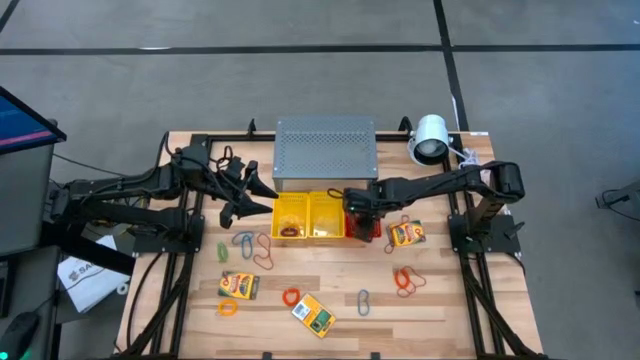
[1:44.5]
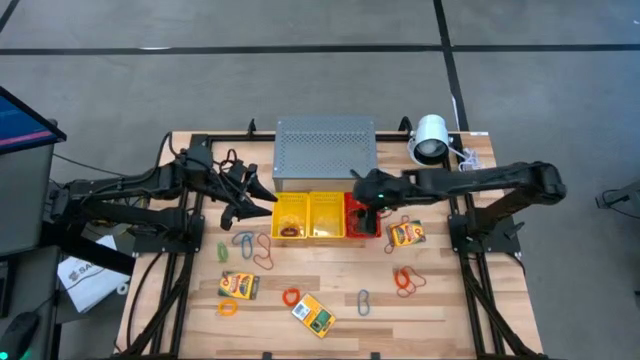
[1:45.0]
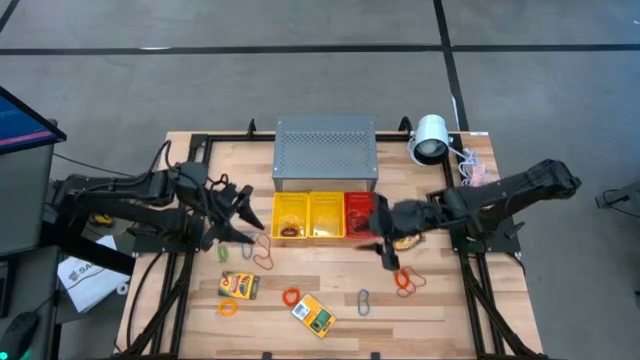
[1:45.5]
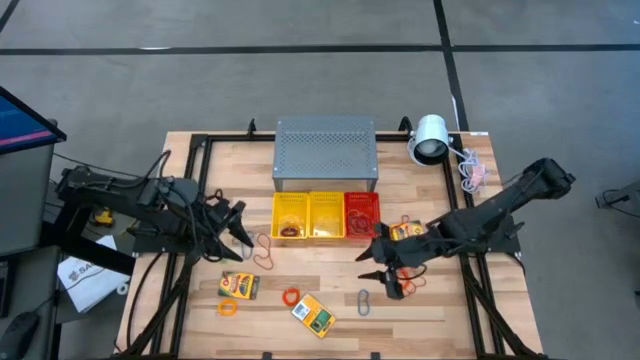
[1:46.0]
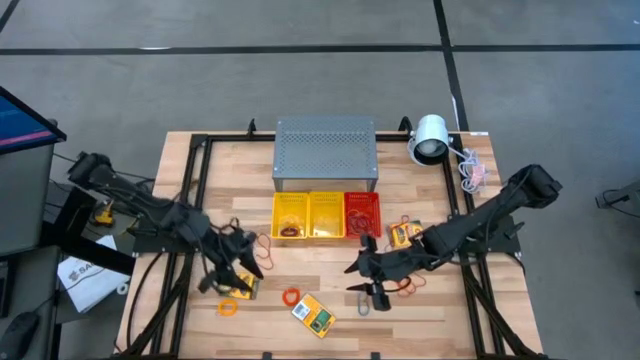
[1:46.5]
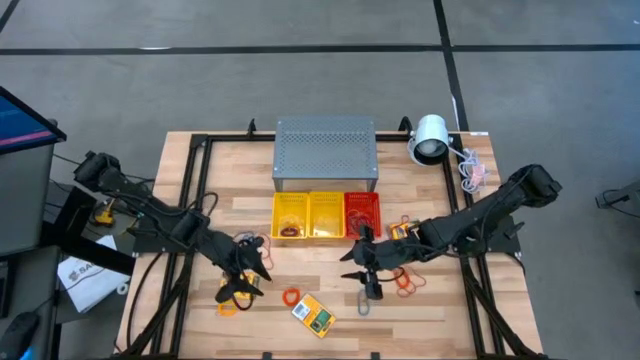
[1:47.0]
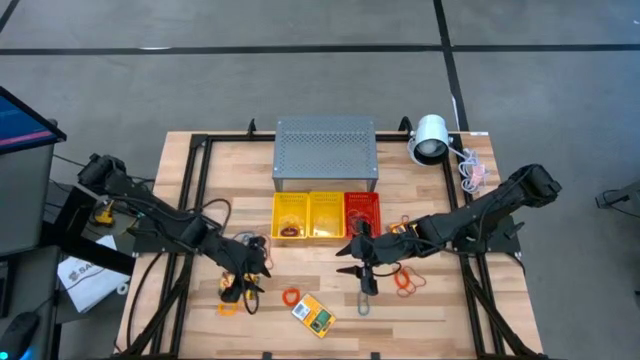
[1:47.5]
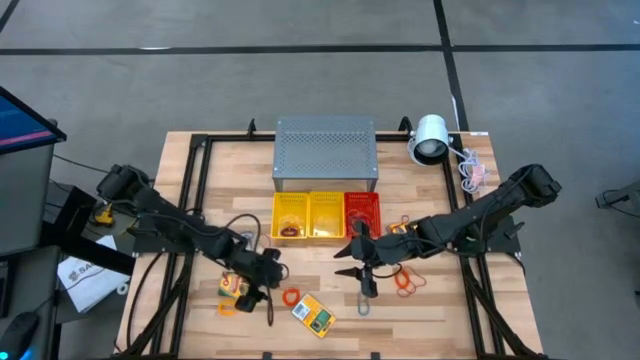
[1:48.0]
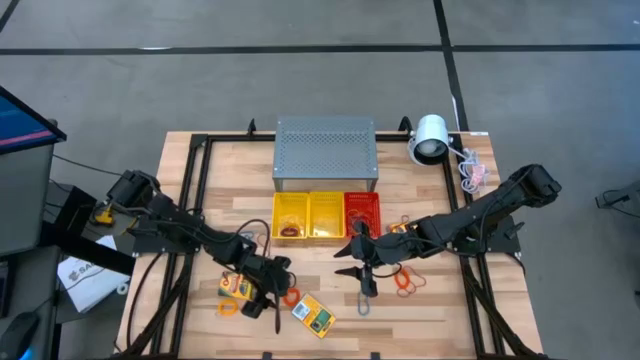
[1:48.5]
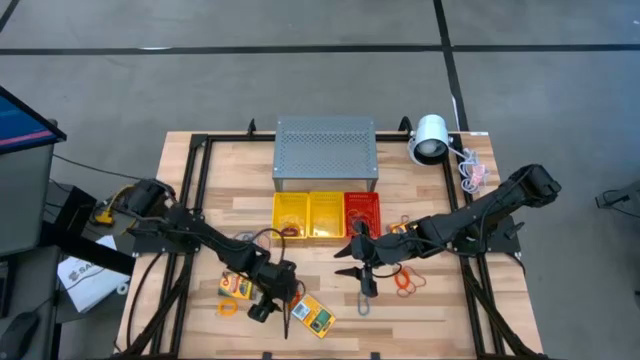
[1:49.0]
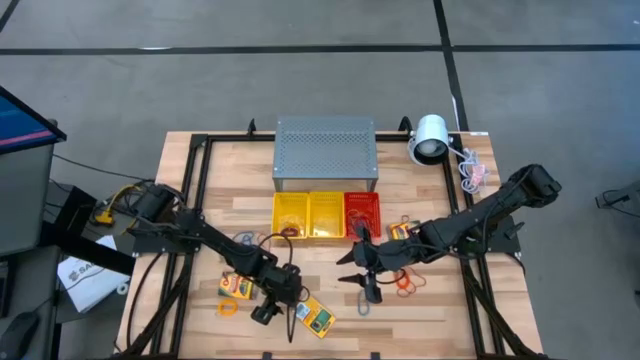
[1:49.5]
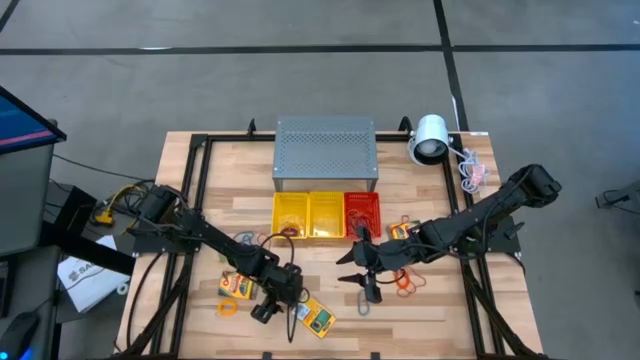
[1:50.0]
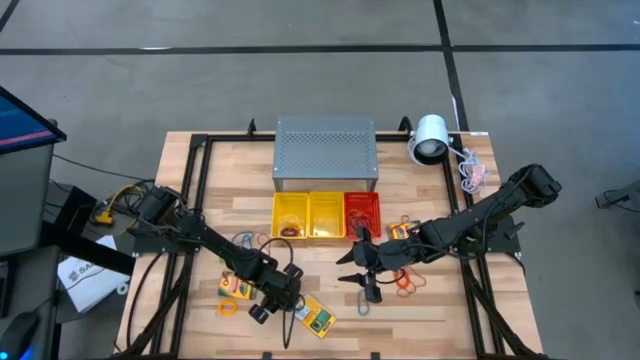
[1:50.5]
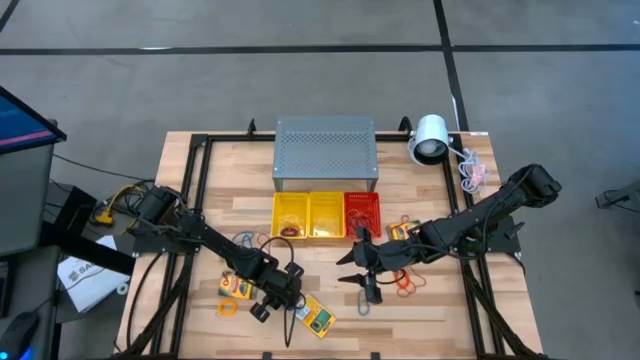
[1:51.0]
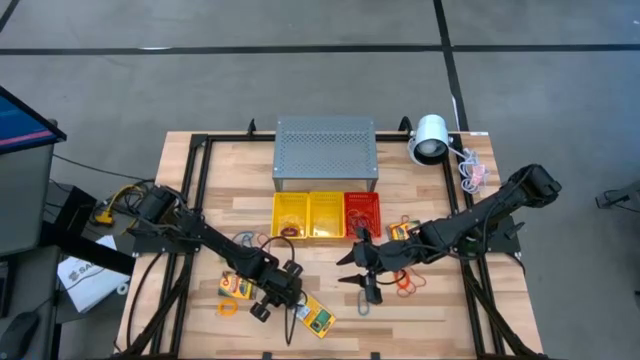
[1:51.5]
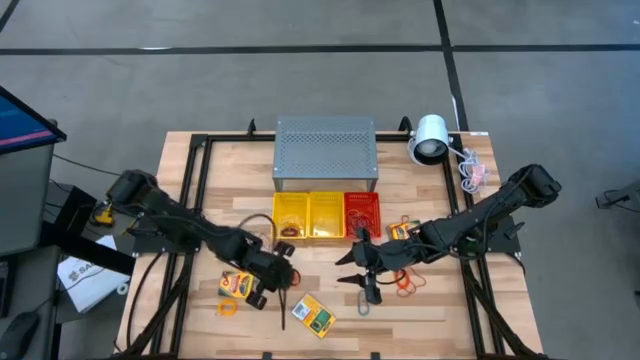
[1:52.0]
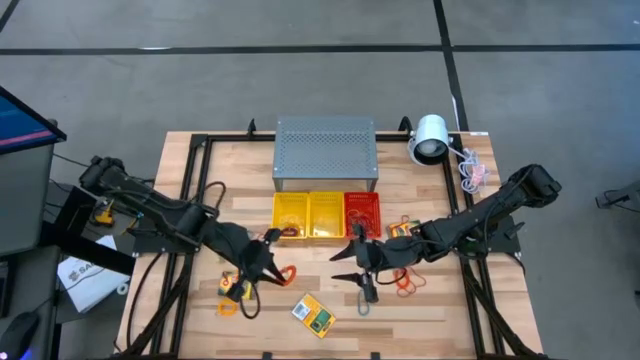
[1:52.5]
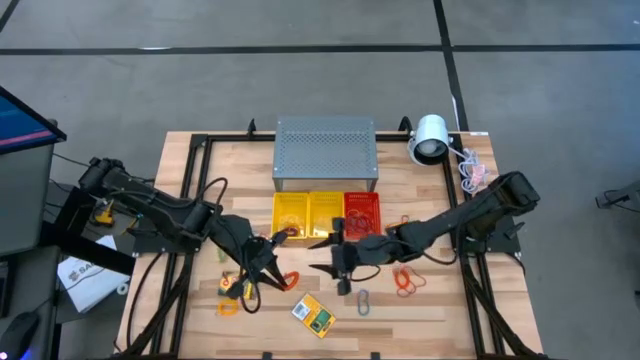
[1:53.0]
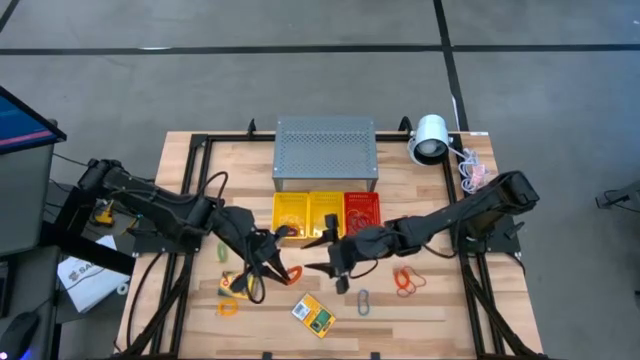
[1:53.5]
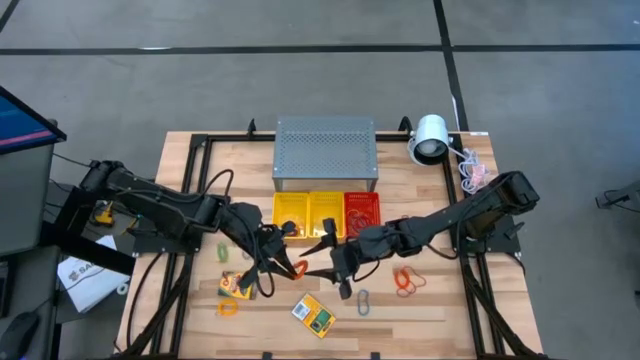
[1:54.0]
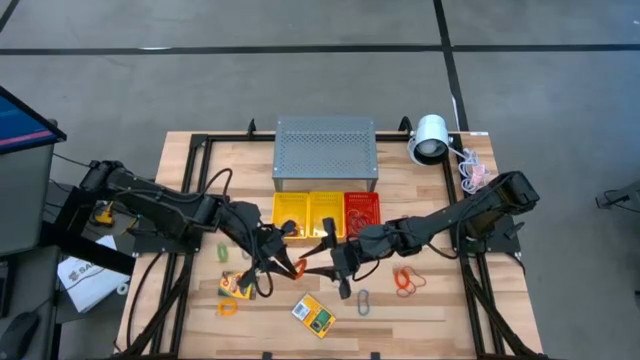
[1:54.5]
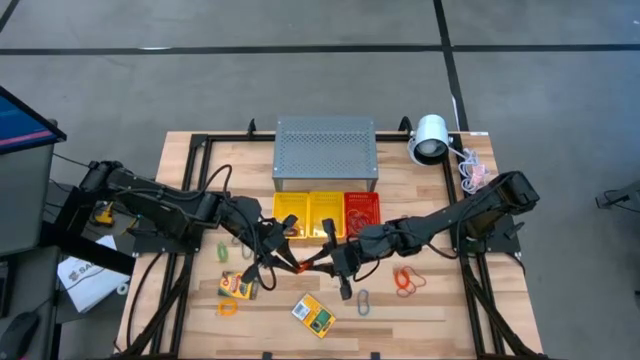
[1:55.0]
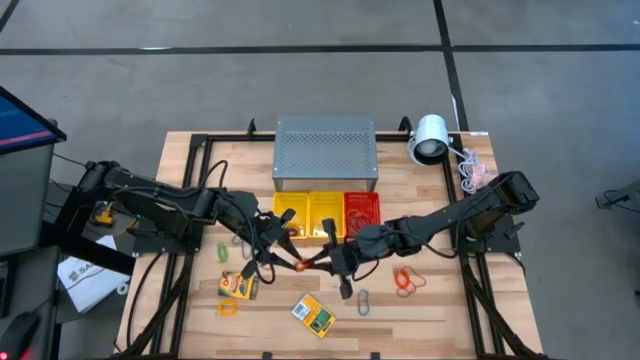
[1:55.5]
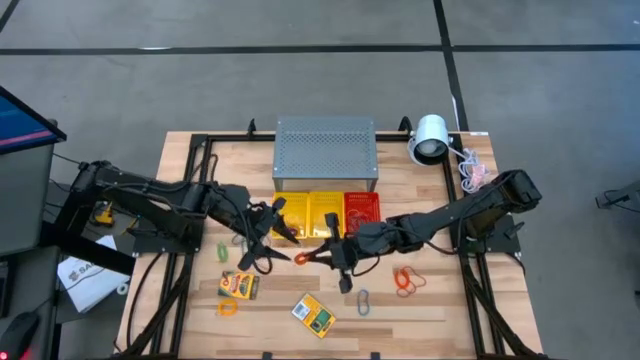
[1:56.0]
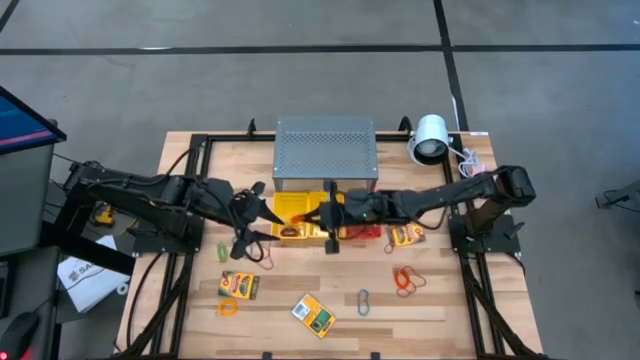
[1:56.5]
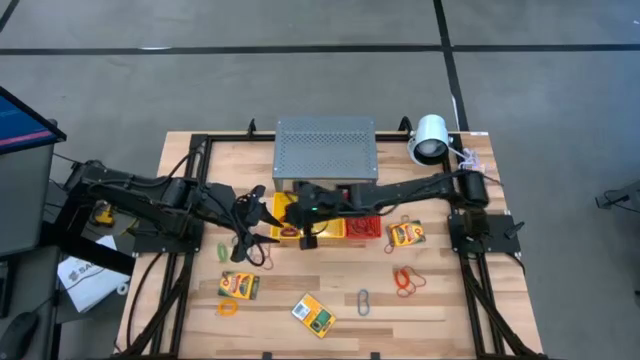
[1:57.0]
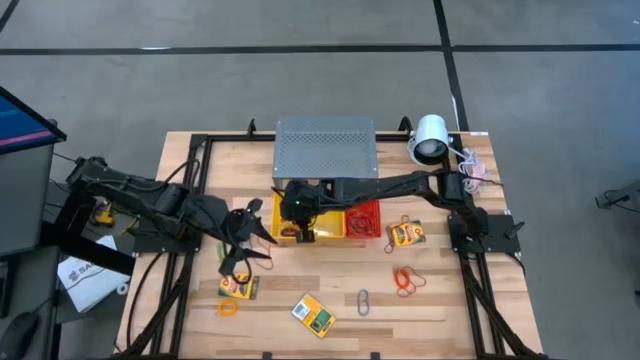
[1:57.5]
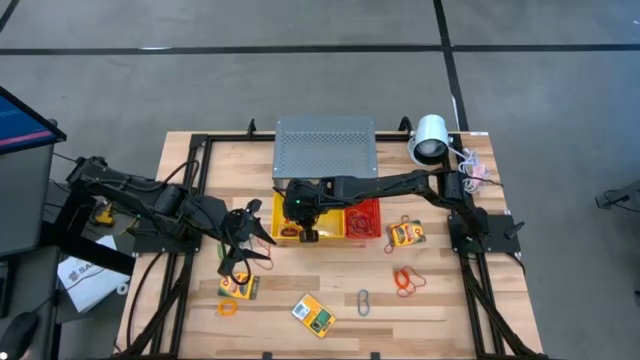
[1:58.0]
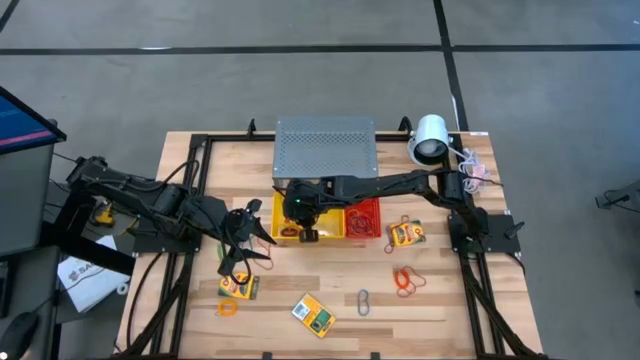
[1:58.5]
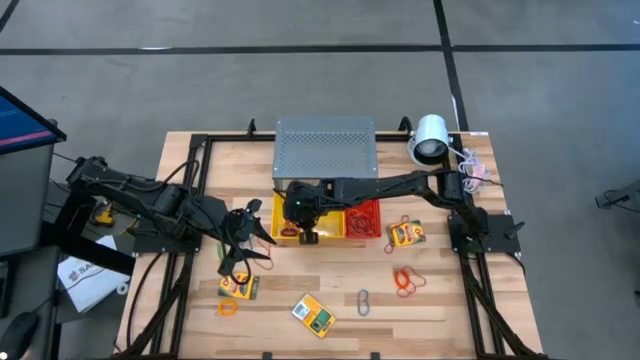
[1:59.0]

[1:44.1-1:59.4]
Task: Pick & Place Office Desk Supplies
Put the orange spring keychain into the left yellow bin

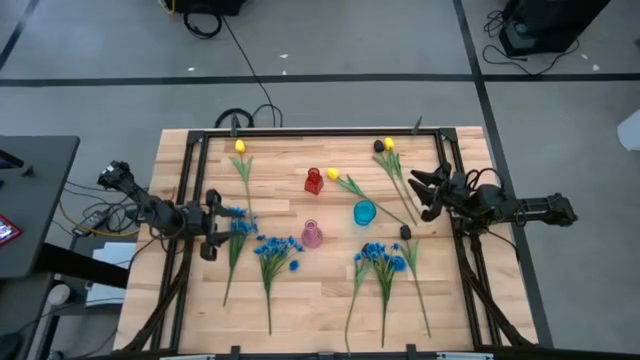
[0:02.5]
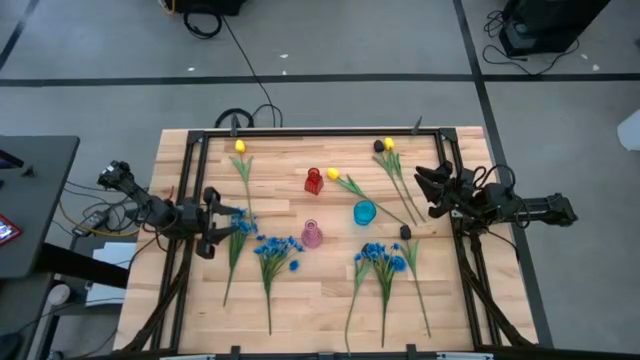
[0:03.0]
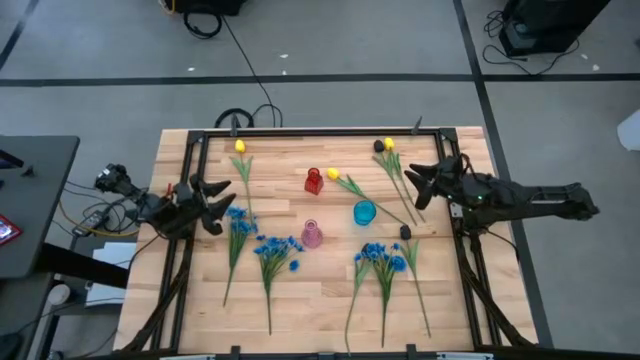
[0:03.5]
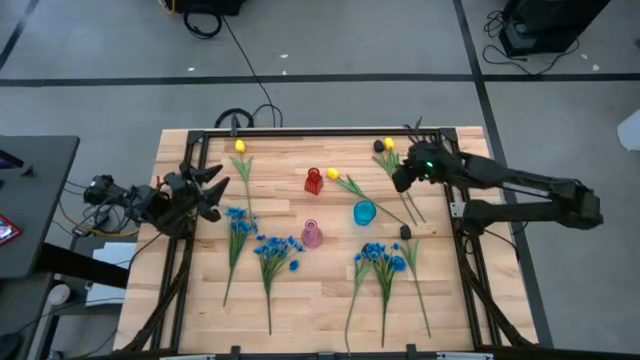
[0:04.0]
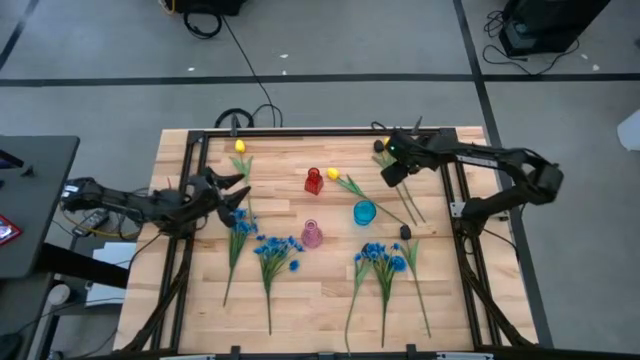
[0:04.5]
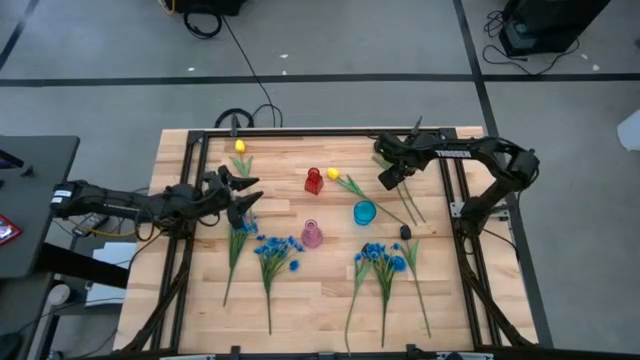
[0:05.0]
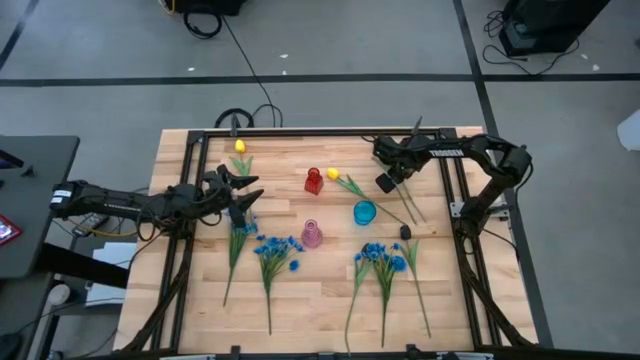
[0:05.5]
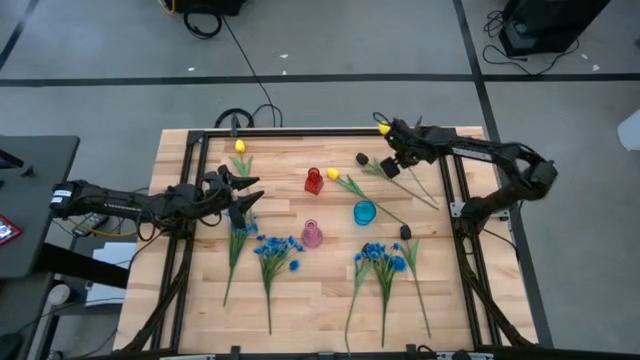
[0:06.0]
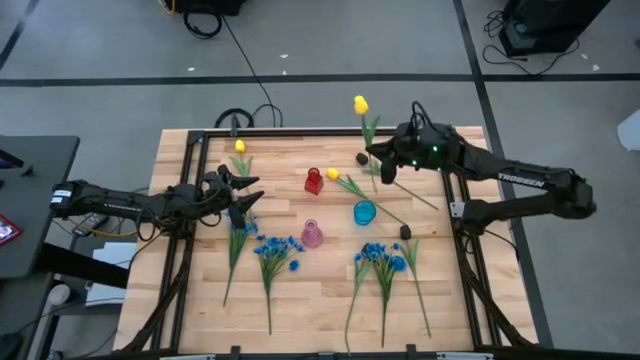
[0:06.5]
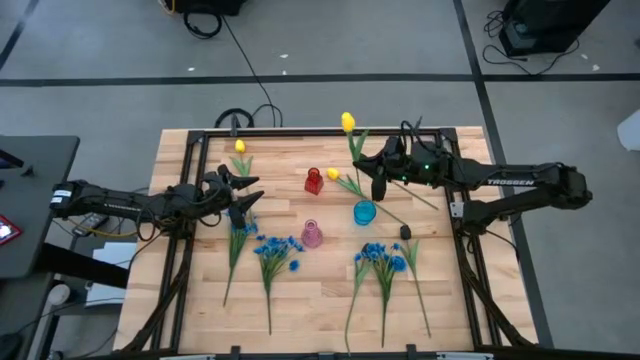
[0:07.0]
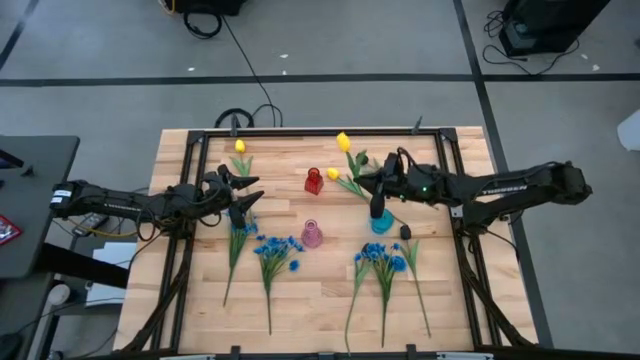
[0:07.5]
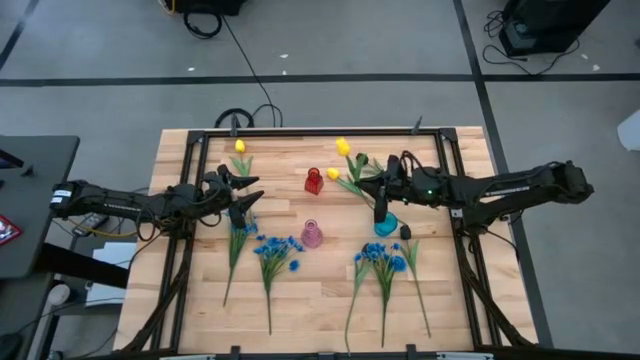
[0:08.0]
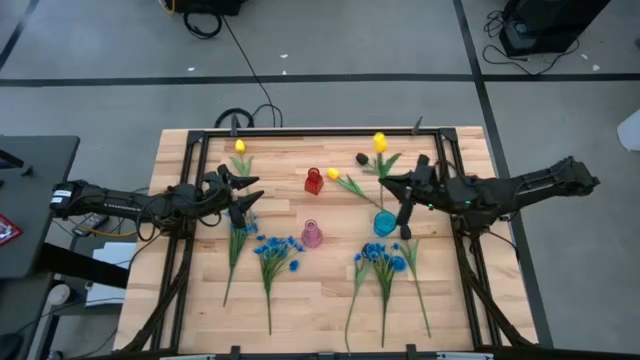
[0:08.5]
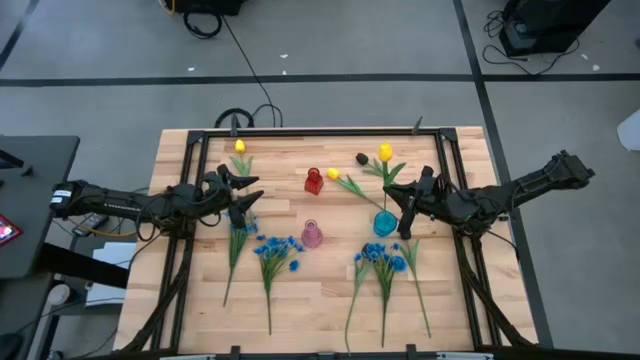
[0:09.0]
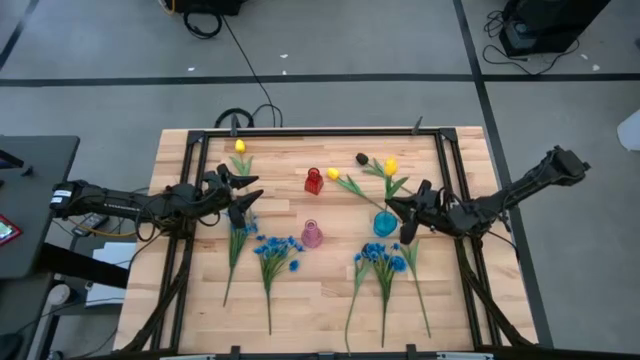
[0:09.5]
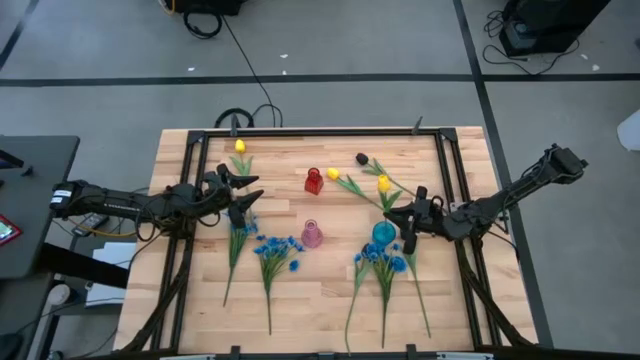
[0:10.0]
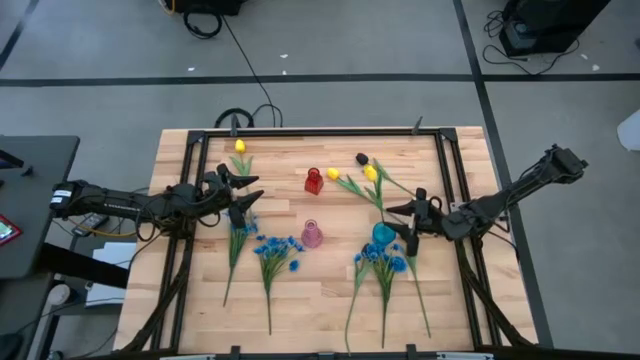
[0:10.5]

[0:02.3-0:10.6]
Task: Sort flowers into vase by color
Put the top right yellow flower into the blue vase
